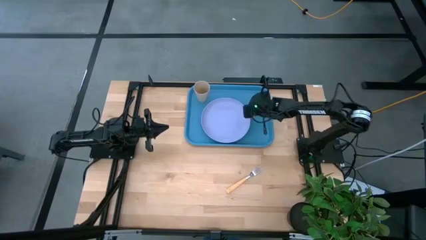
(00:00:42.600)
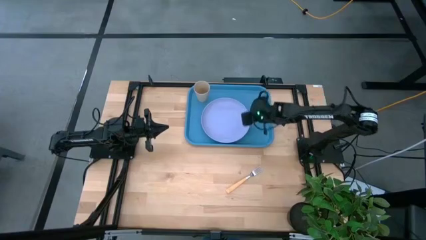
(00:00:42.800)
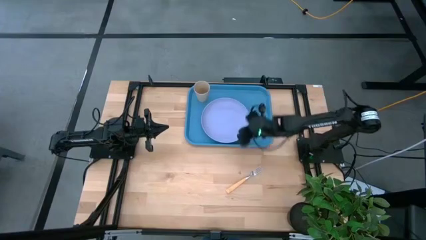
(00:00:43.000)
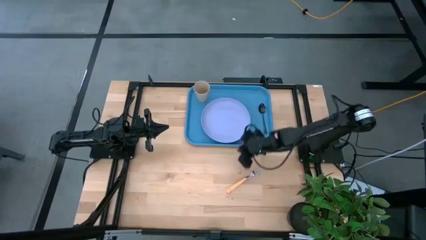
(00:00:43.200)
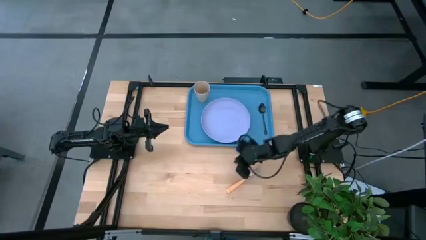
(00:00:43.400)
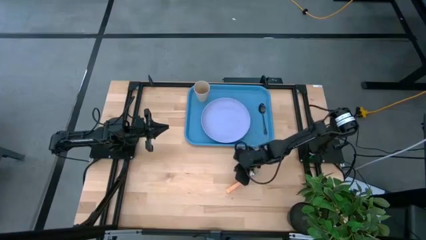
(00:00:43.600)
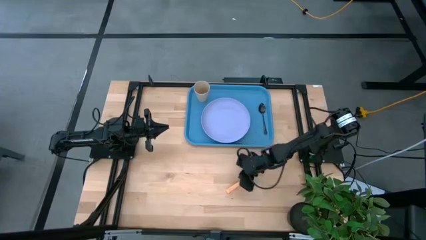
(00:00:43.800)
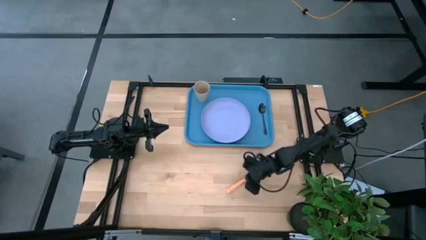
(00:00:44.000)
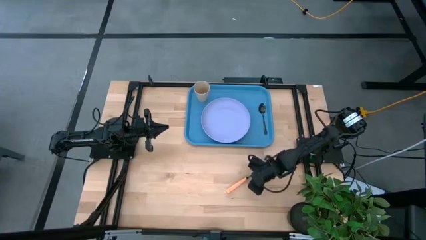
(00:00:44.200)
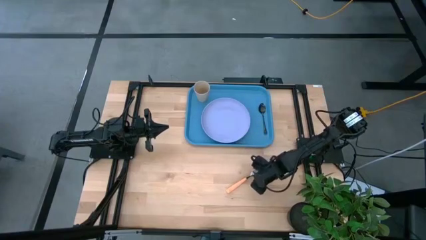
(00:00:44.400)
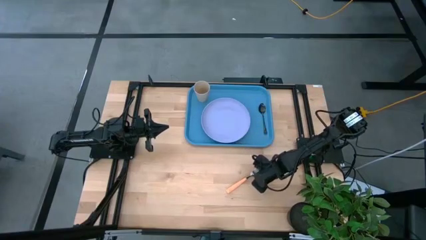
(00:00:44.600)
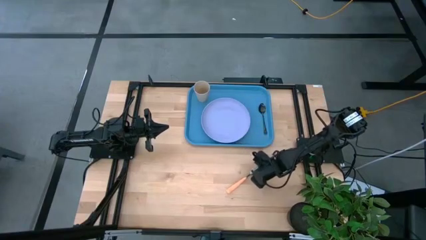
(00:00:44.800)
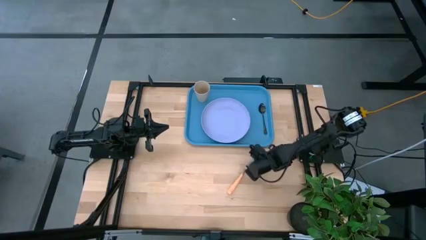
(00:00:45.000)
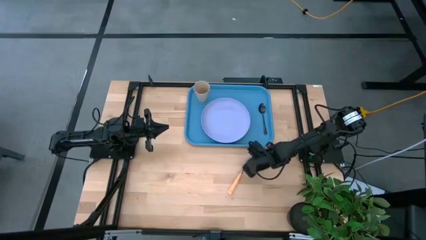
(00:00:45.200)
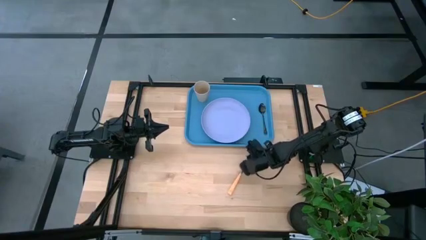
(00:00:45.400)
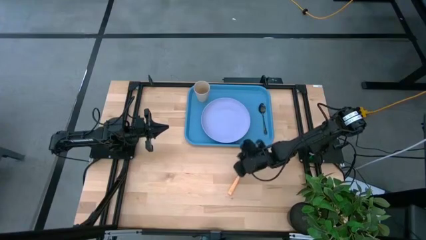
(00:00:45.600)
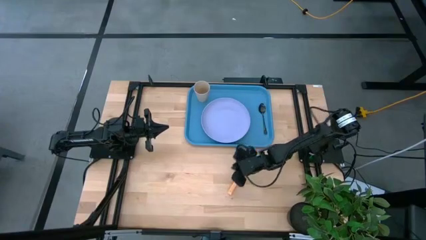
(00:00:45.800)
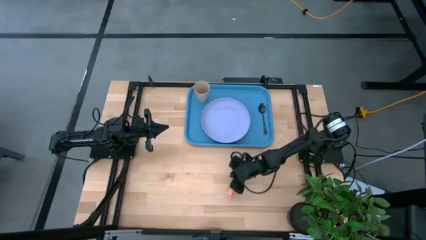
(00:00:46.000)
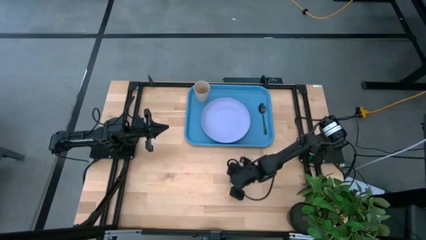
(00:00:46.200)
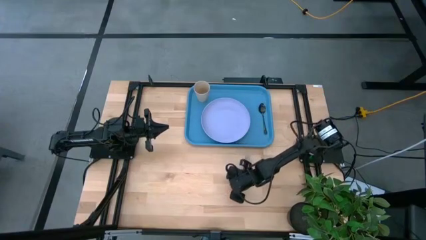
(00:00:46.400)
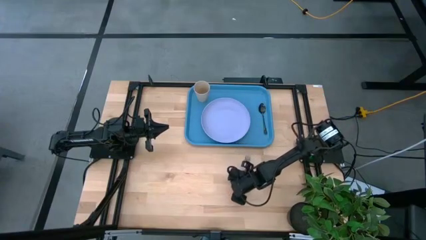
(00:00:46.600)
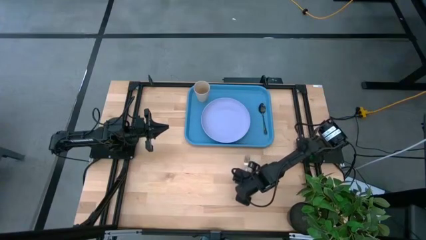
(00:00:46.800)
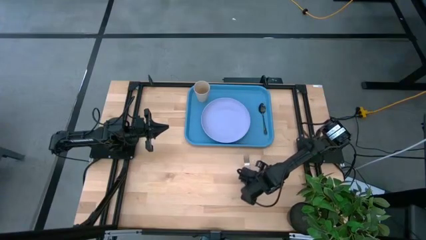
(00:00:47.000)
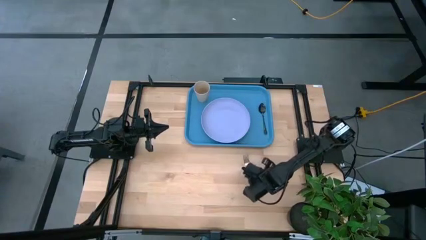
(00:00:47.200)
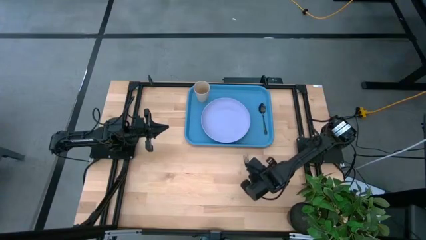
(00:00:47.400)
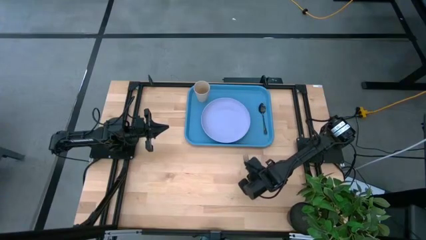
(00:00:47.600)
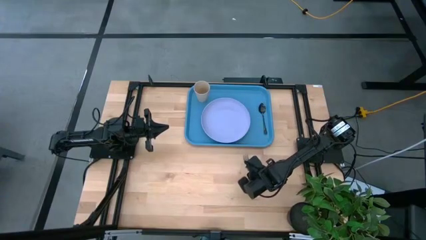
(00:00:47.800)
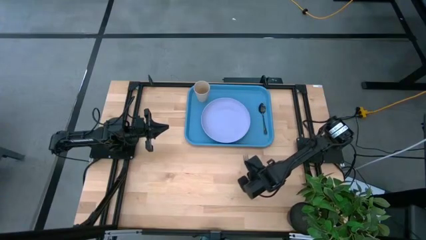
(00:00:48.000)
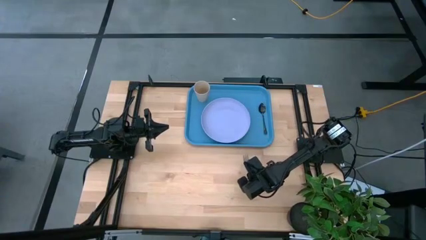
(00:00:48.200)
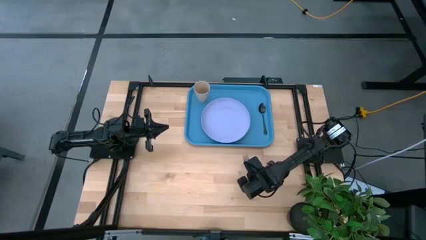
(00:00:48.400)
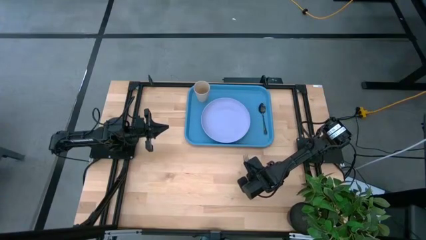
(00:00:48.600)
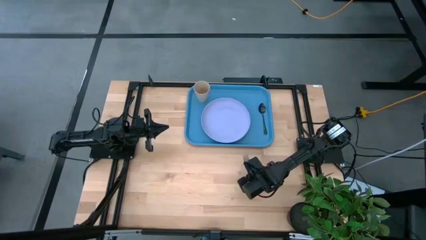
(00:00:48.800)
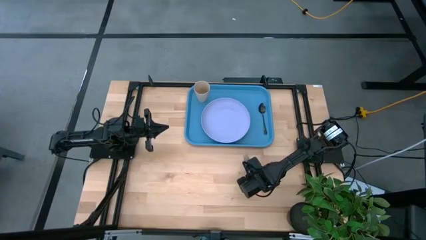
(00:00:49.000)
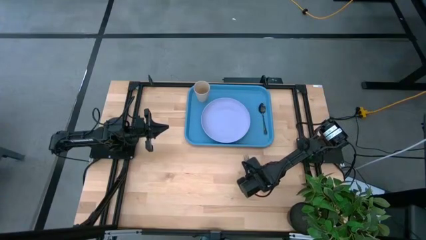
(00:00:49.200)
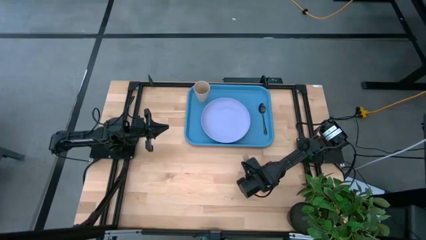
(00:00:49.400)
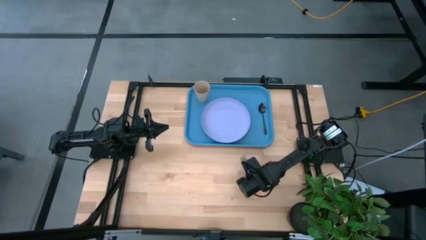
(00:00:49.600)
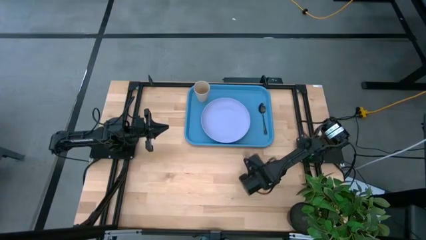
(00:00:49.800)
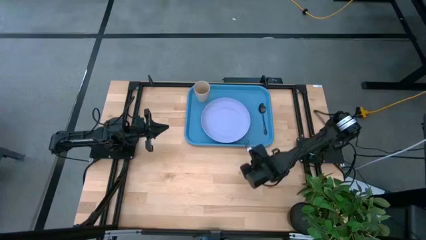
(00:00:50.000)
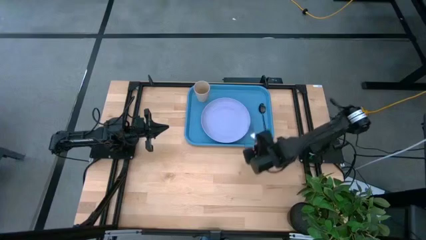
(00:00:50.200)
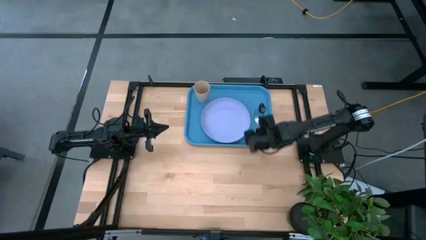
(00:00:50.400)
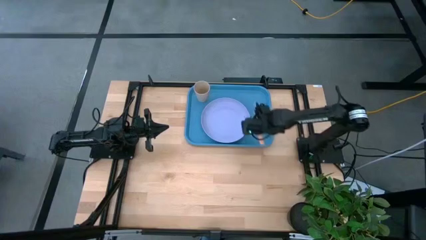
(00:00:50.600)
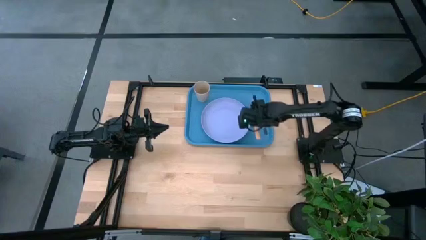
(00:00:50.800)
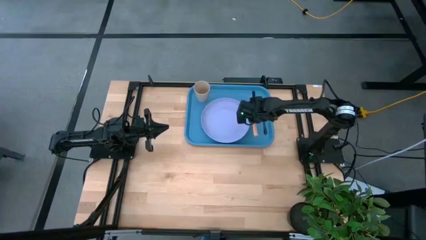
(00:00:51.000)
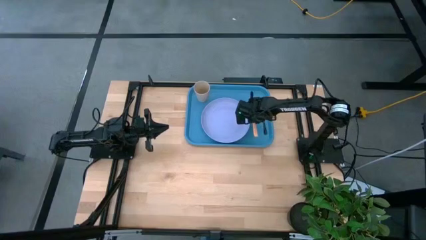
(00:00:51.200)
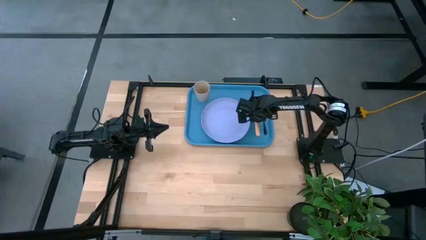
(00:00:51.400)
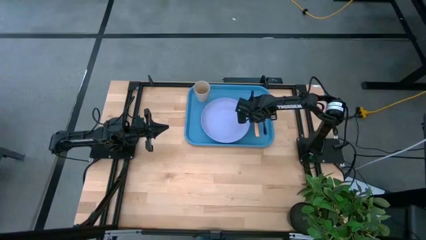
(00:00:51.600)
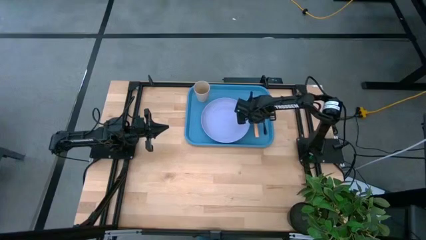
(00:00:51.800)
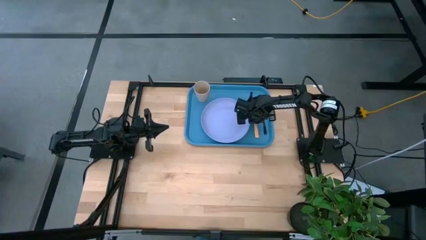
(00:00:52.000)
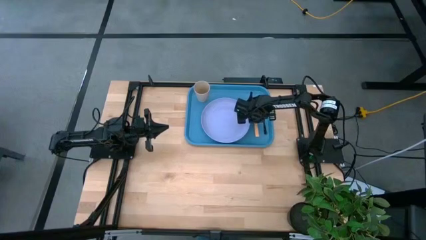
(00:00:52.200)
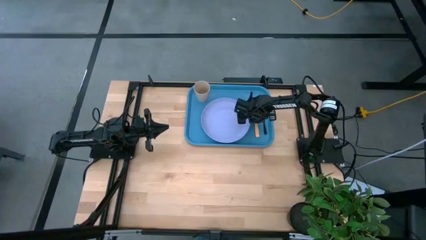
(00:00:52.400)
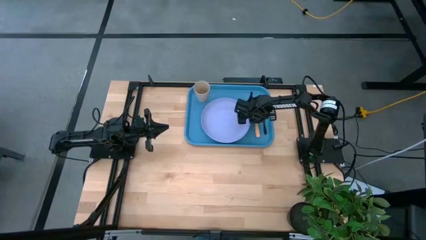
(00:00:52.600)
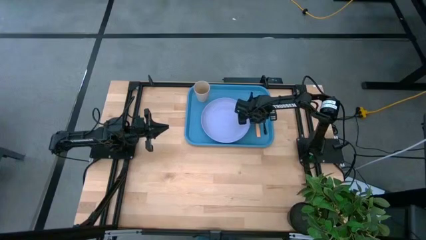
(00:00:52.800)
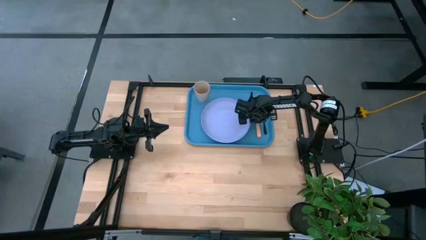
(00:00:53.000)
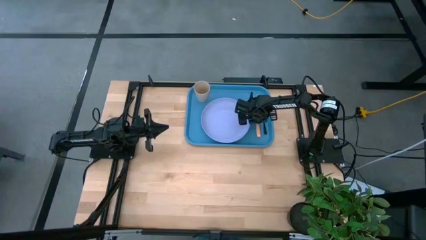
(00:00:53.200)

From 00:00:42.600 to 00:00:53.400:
Task: Pick and place plate/cup/fork/spoon on tray
Put the brown fork on the blue tray to the left of the black spoon

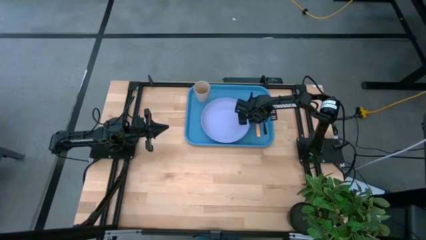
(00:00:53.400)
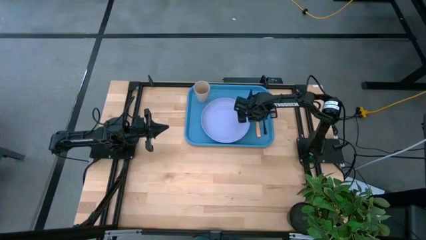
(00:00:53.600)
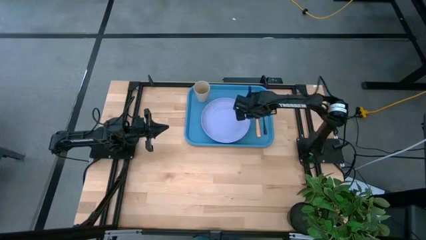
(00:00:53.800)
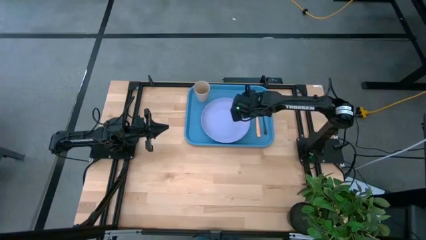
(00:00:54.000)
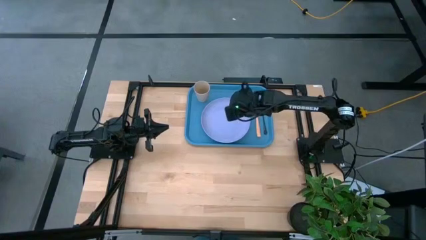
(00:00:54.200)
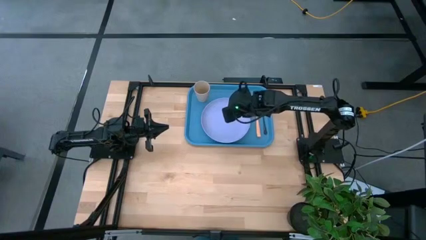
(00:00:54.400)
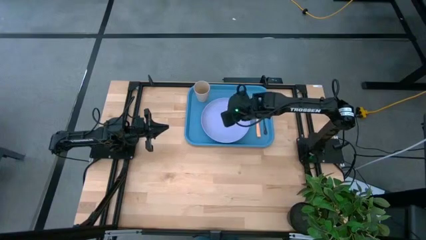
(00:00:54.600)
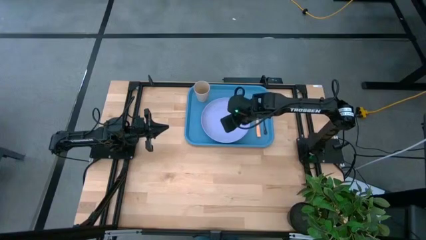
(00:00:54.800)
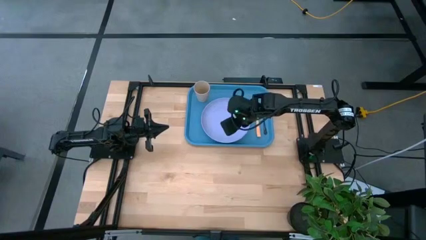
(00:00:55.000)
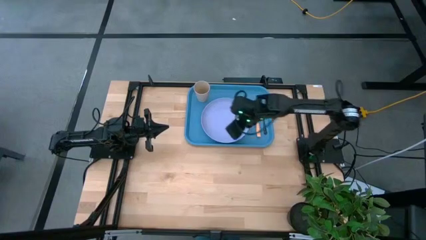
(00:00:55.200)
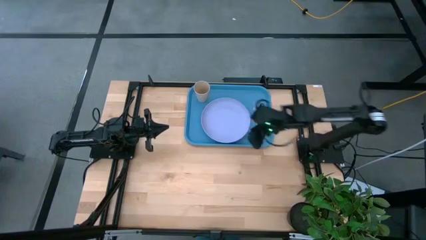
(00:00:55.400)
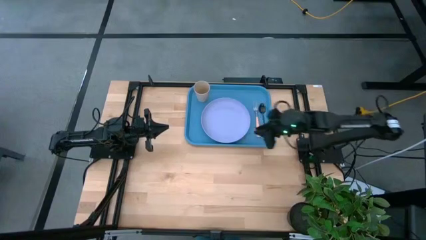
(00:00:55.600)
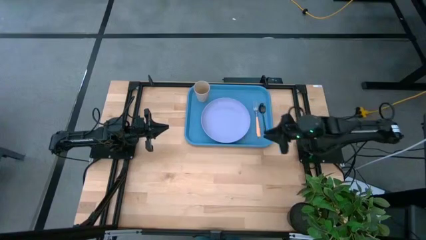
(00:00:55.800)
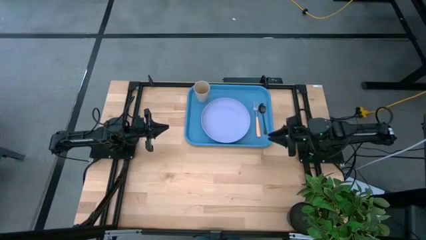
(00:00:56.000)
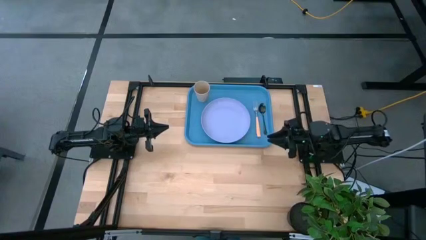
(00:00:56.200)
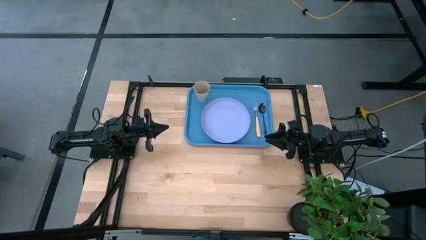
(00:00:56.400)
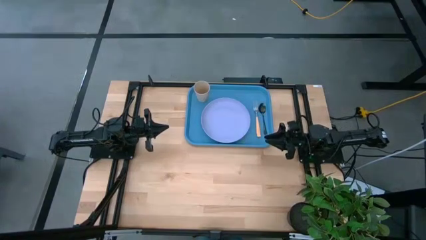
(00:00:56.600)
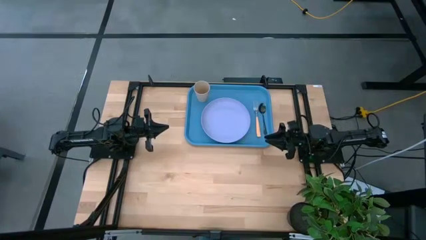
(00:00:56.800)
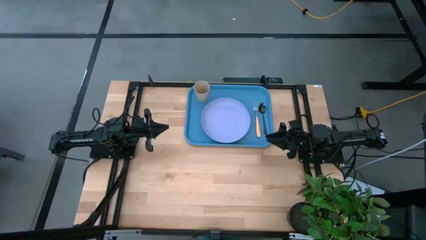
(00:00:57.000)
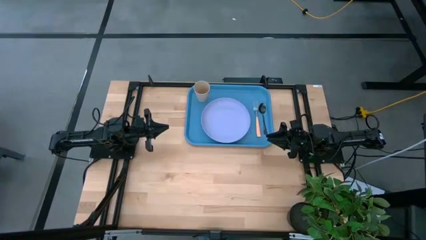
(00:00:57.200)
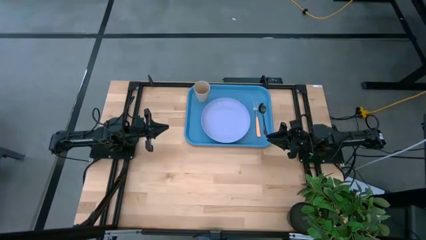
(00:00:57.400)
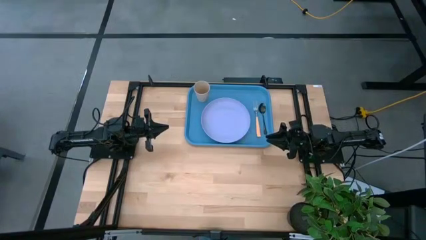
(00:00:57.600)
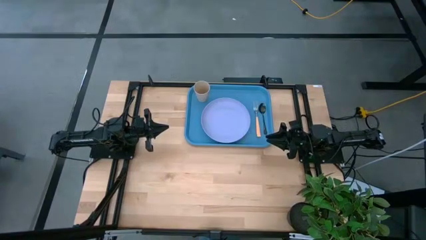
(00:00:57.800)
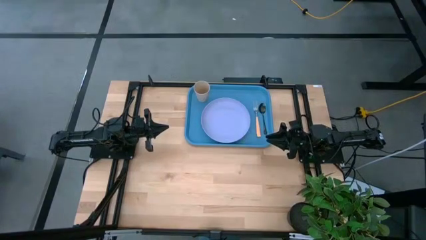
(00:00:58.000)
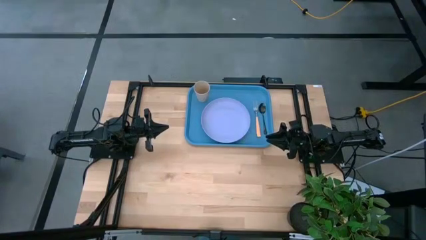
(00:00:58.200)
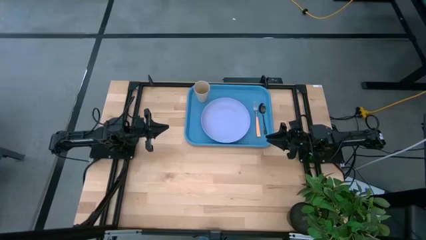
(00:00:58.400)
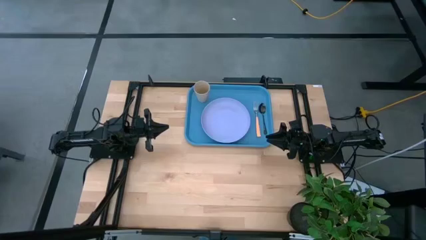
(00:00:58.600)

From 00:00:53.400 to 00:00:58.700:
Return to Home Position
